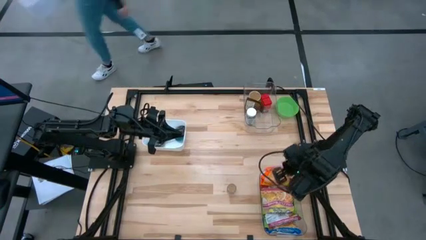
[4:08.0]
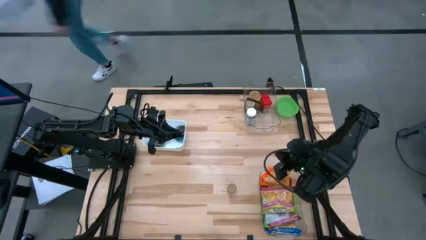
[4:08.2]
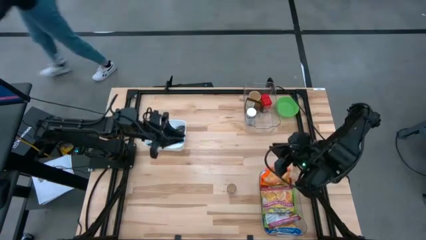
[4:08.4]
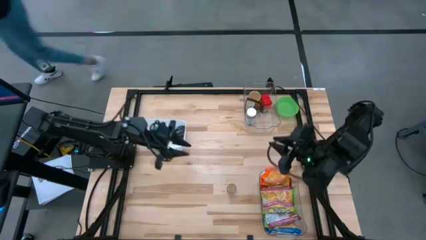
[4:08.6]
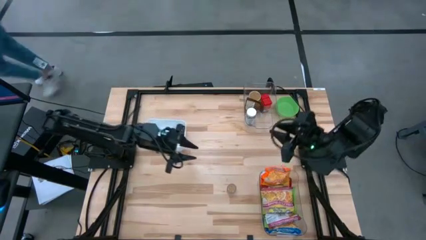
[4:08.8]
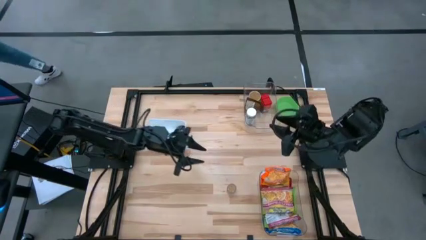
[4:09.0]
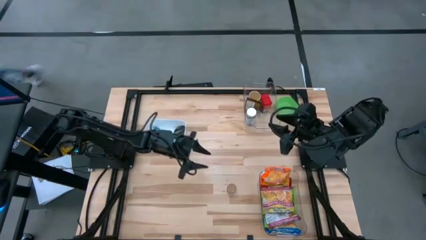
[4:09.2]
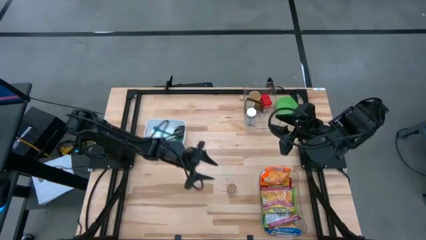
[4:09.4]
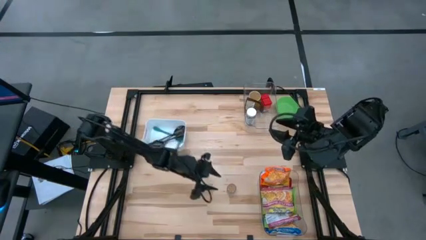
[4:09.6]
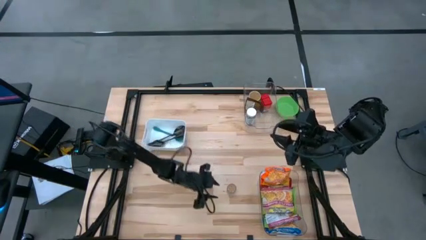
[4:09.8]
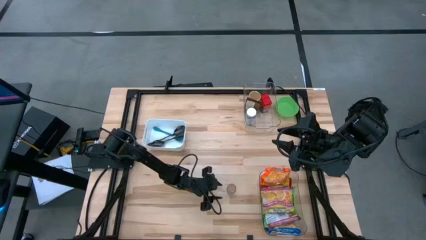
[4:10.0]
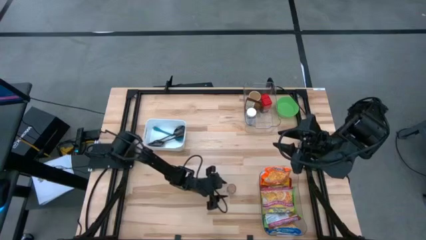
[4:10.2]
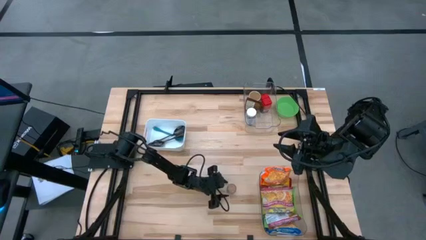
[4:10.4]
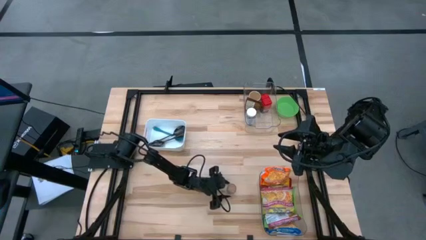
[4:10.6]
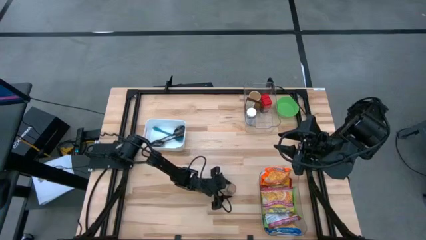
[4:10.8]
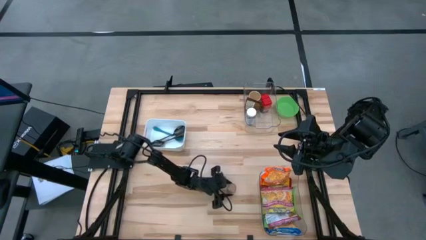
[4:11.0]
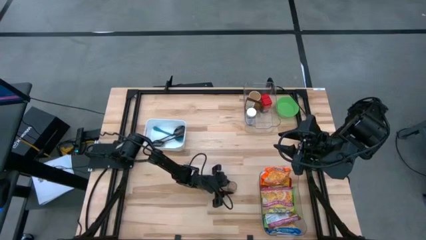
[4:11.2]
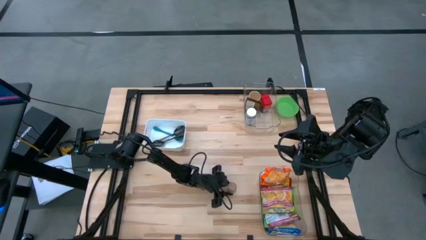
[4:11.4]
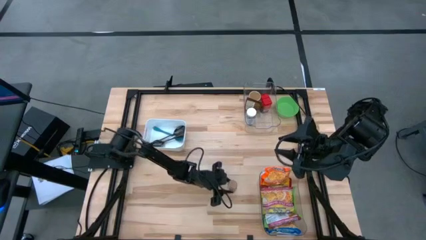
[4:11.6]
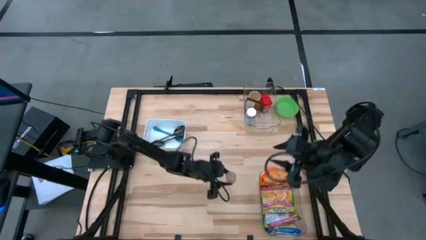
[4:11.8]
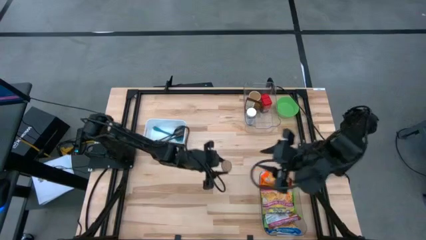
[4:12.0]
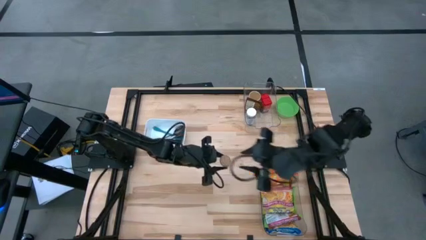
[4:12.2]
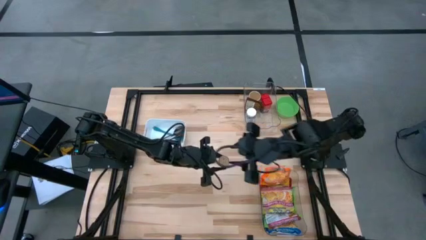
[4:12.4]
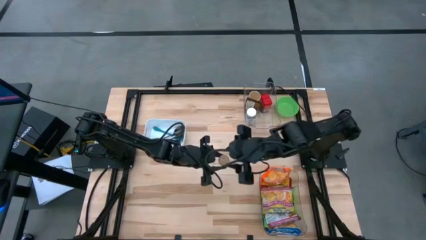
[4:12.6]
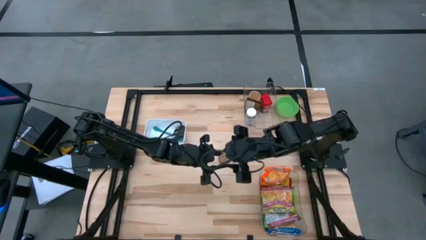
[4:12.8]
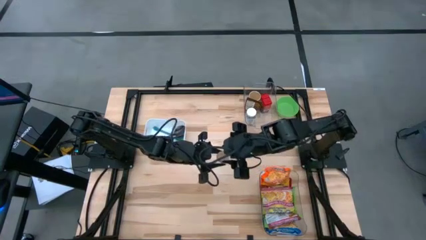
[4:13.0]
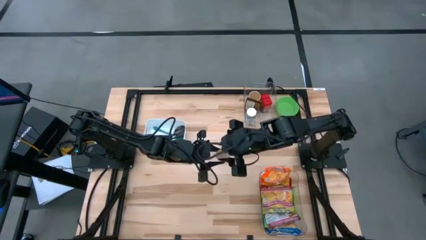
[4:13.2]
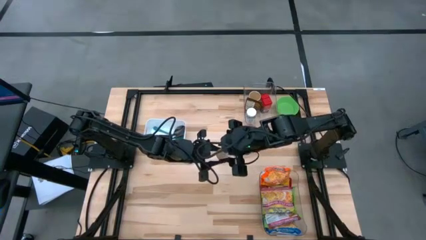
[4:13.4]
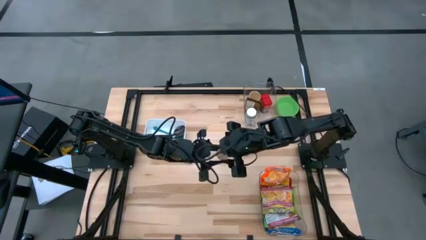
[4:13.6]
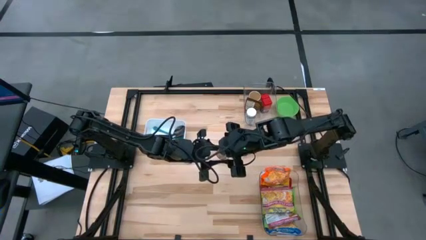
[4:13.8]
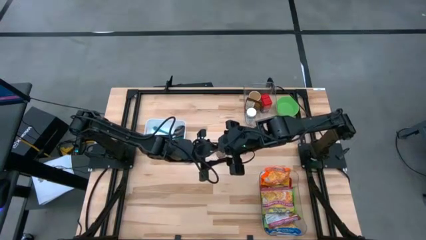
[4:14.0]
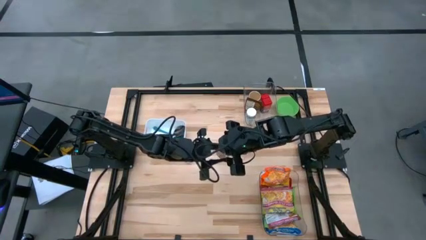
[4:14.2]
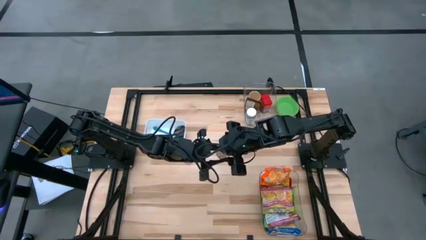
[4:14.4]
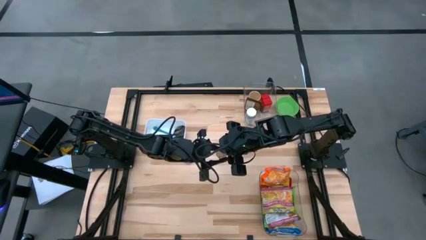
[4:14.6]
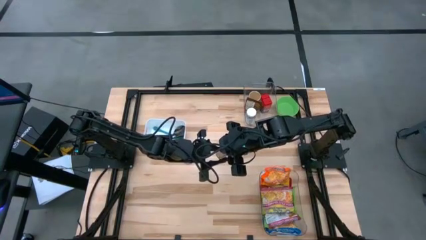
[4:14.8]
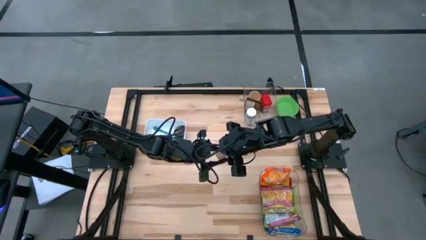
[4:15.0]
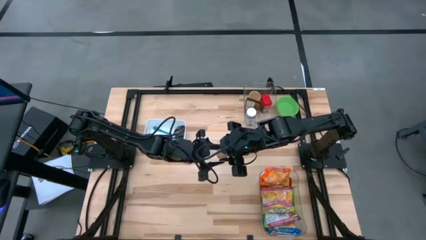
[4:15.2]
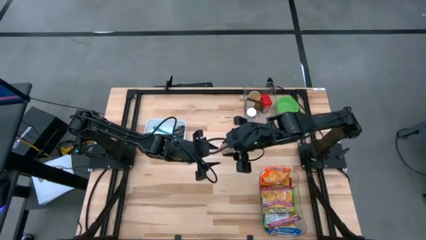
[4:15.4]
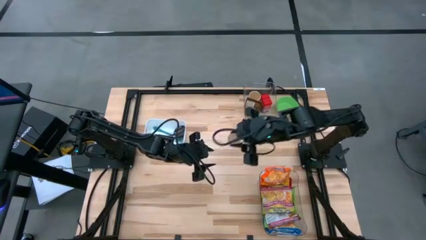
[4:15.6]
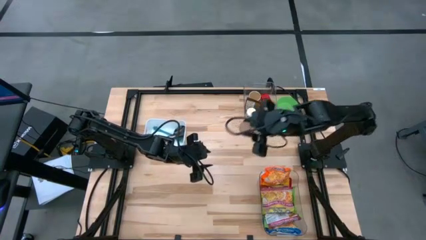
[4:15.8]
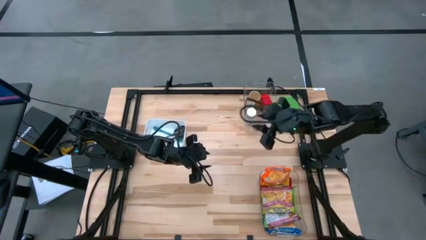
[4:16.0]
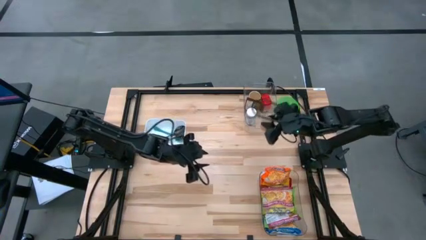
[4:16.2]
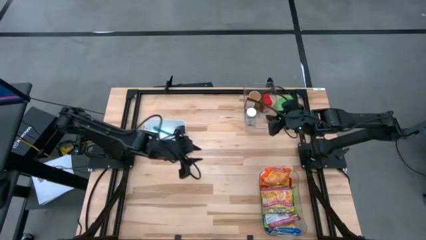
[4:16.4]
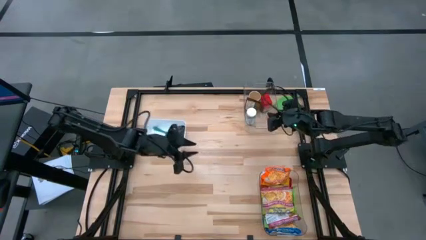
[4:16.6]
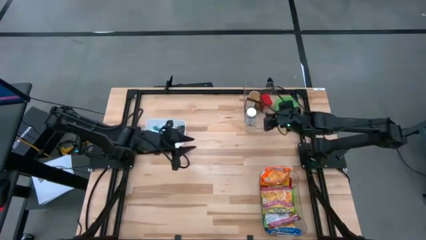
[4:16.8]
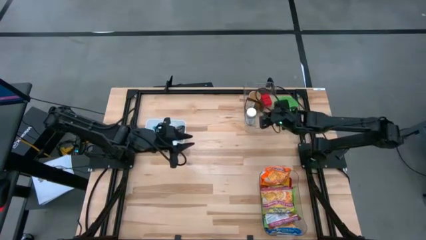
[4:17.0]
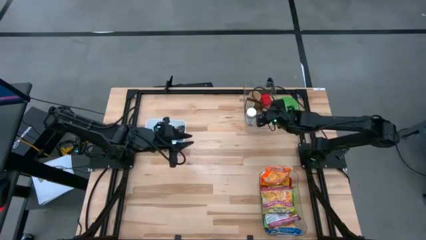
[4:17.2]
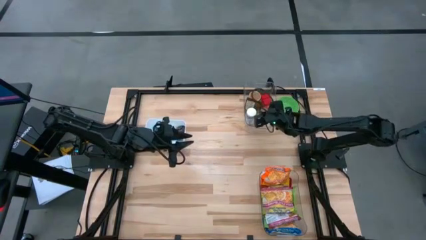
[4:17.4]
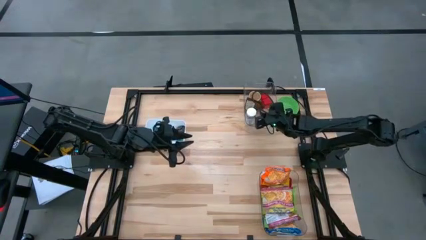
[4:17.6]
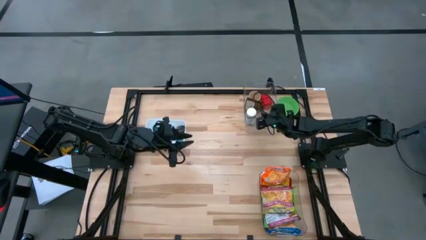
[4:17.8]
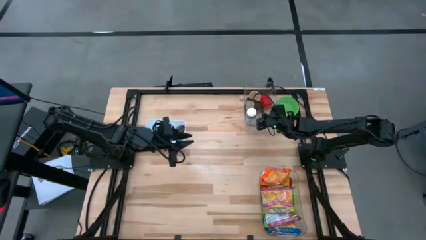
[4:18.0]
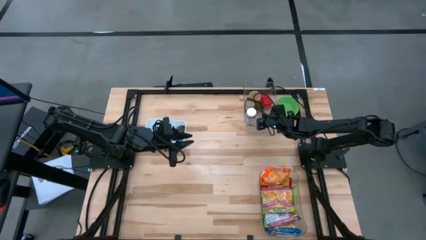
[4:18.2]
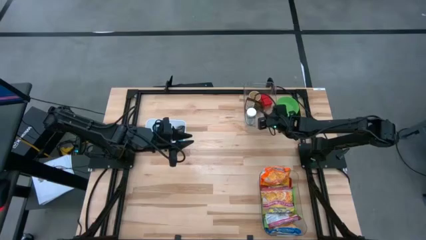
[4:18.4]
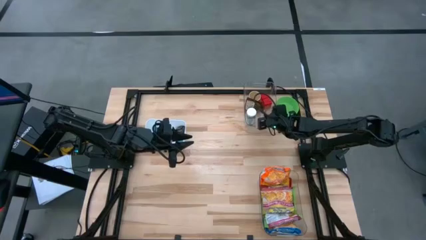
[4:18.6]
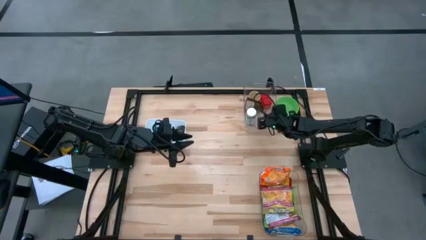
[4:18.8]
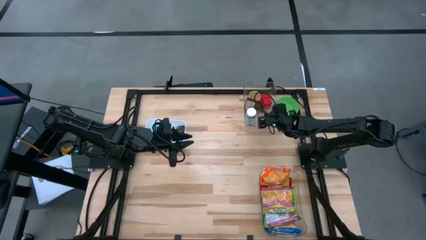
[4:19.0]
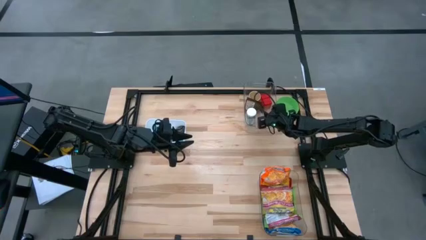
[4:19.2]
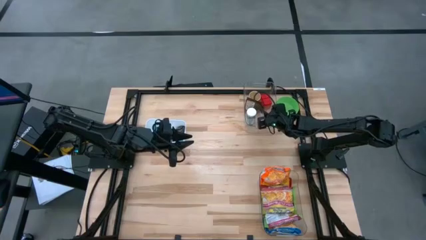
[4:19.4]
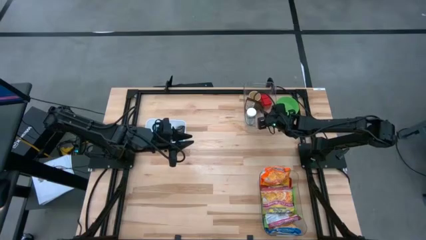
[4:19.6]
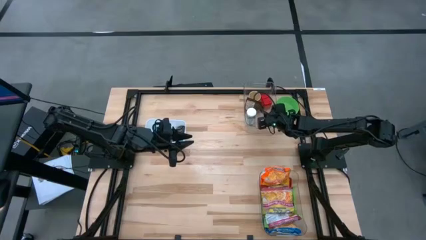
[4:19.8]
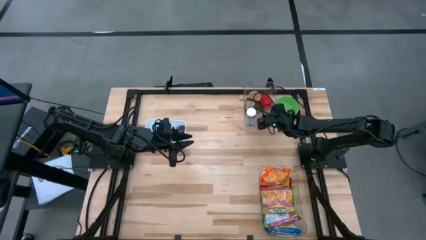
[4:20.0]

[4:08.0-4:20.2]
Task: Pick & Place Food Item
Put the brown spice bottle into the top transparent bin

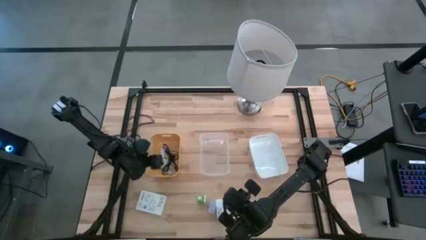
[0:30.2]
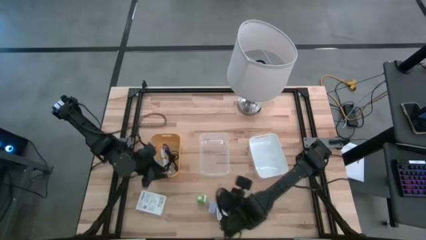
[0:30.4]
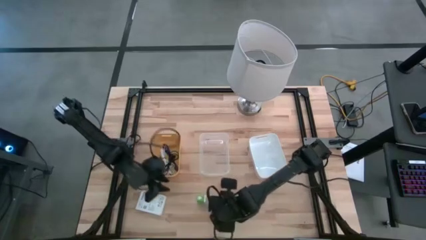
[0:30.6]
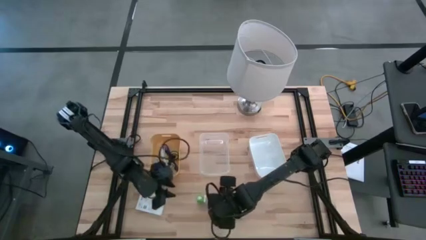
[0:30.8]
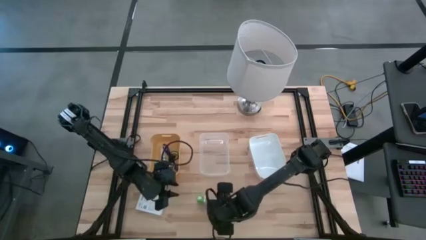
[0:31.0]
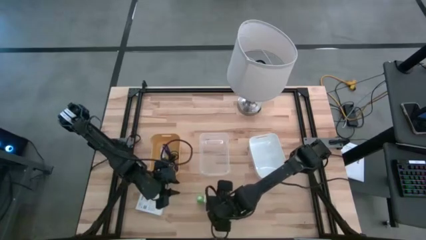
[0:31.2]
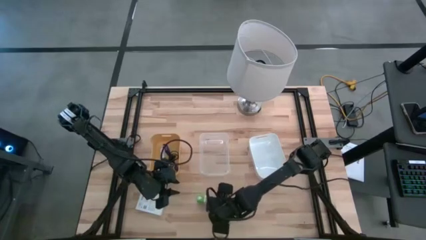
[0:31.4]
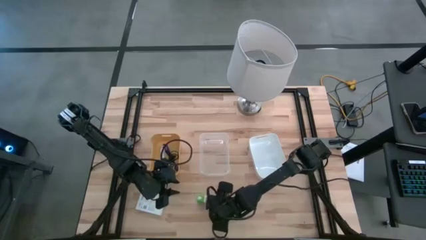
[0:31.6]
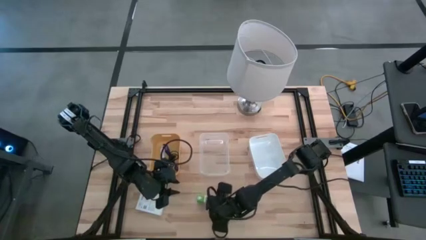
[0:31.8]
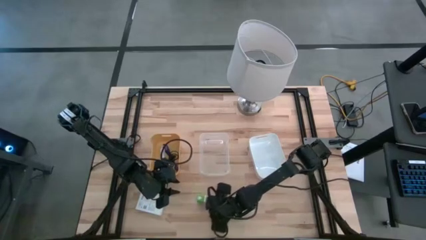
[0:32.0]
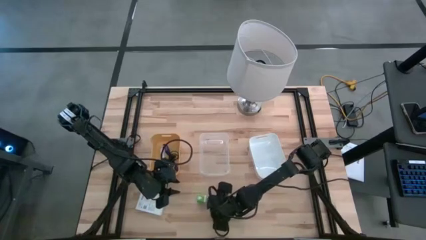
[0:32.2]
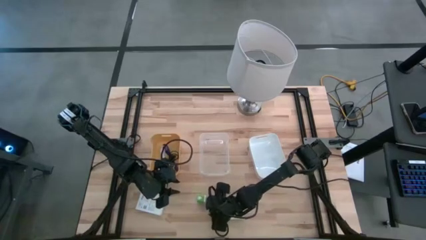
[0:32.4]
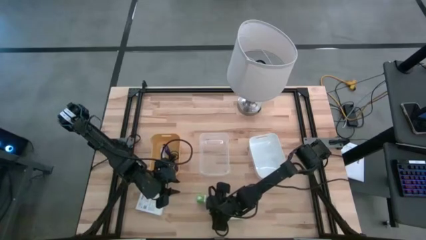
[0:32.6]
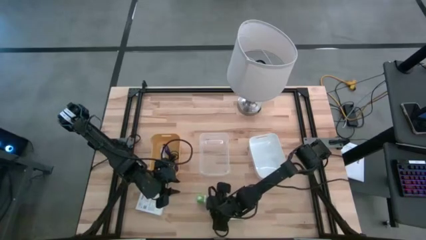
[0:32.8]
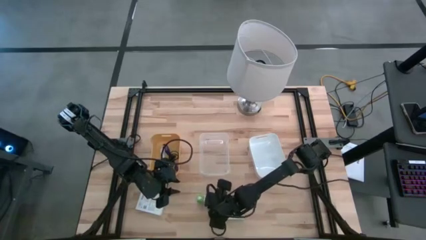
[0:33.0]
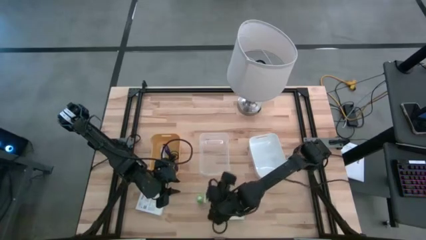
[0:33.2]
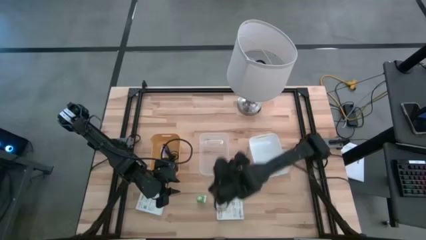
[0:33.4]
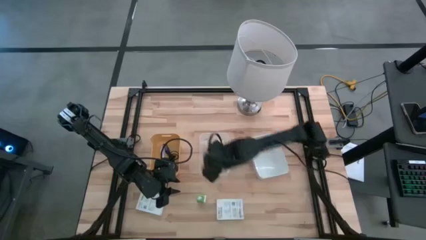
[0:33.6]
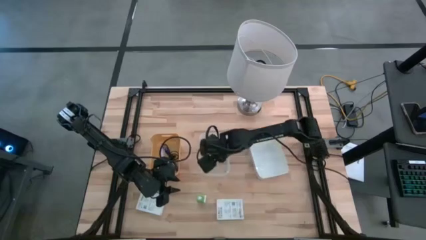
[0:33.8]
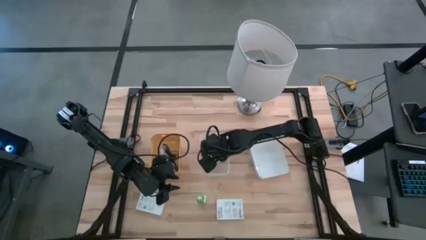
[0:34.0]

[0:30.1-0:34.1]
Task: Pick and place items into bin
Put the white charger adapter into the transparent bin

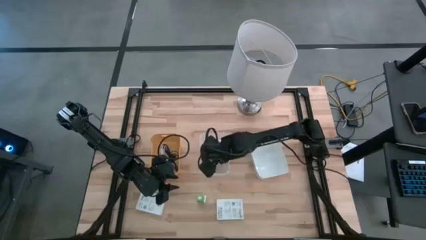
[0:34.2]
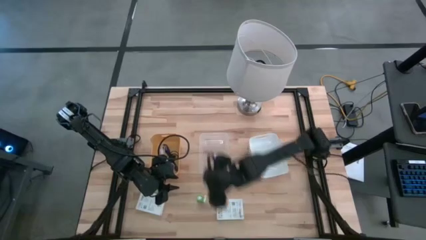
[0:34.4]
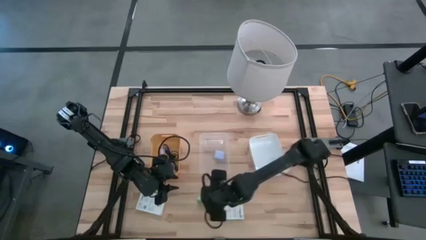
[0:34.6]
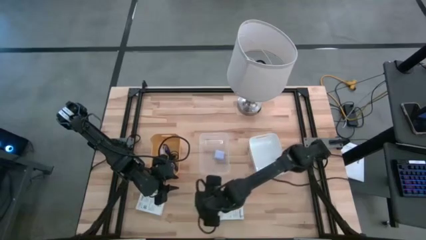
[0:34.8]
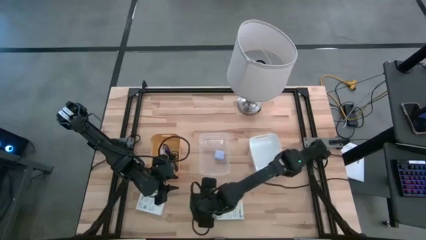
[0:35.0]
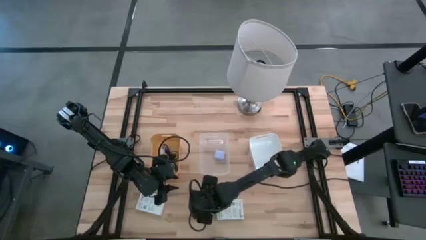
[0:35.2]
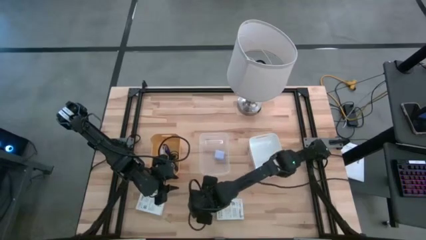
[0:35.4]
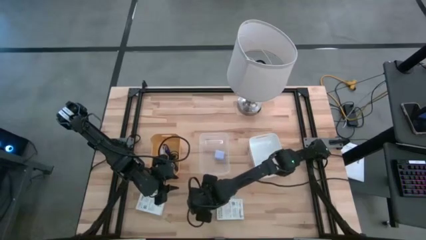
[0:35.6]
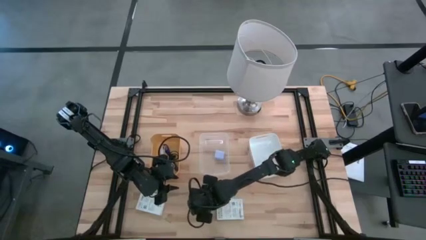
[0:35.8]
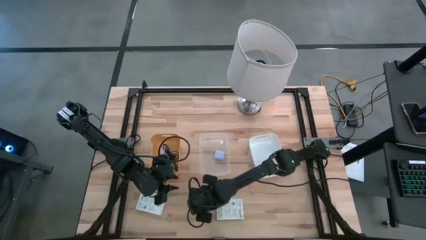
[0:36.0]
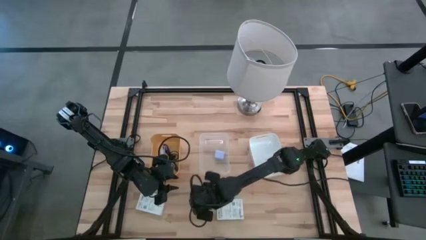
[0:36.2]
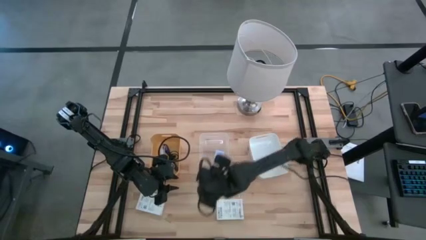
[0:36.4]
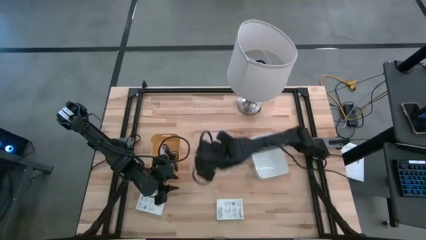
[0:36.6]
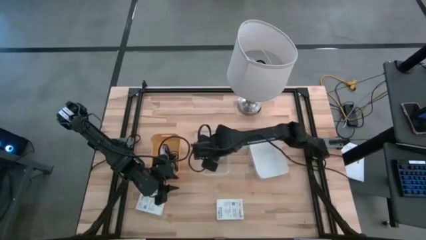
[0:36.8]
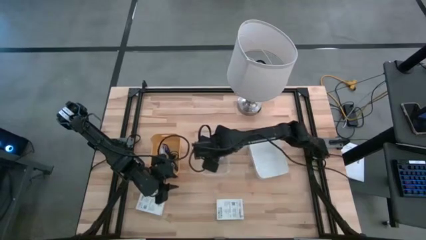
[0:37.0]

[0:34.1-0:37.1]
Put the green charger adapter into the transparent bin
